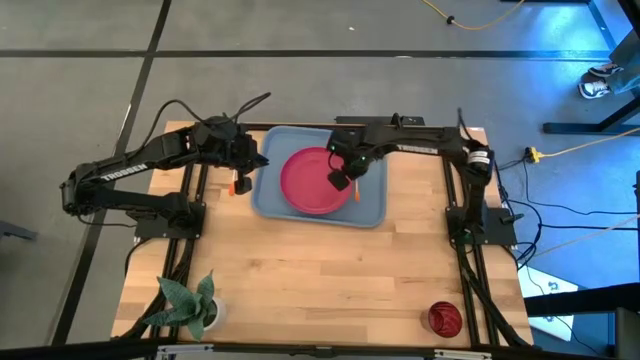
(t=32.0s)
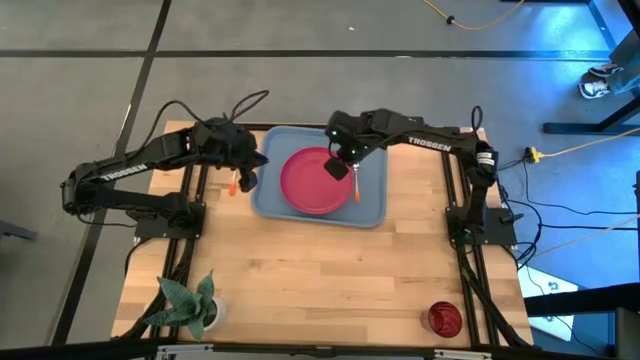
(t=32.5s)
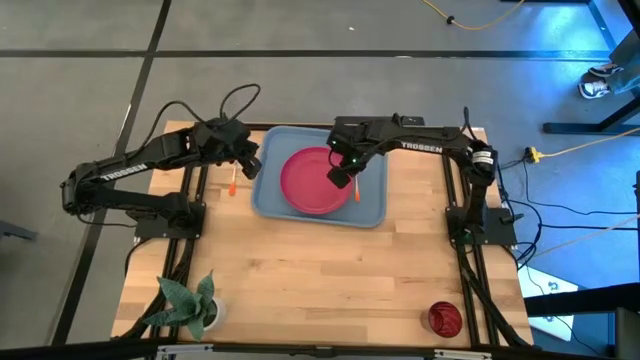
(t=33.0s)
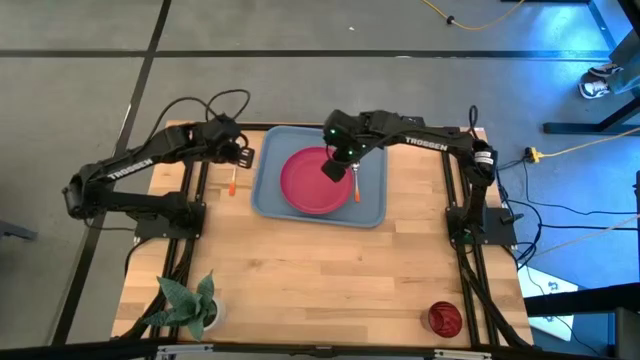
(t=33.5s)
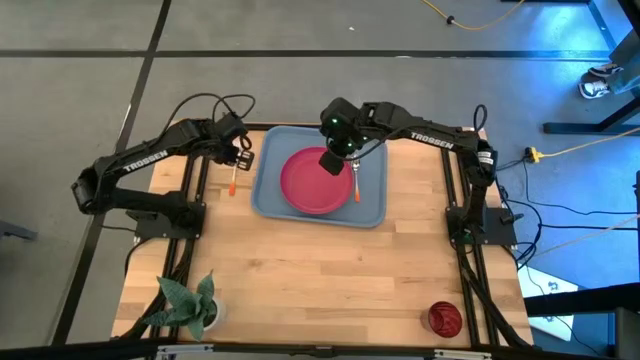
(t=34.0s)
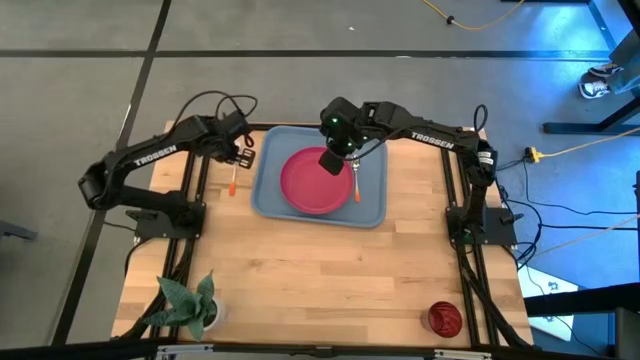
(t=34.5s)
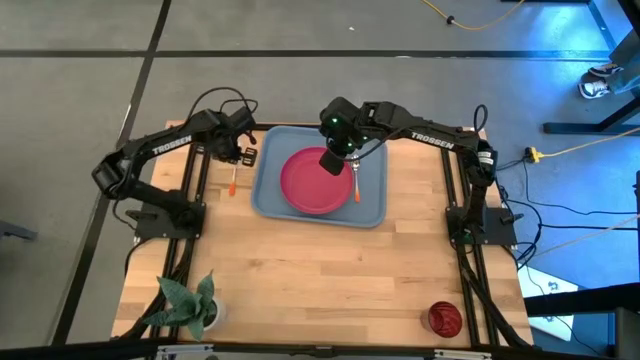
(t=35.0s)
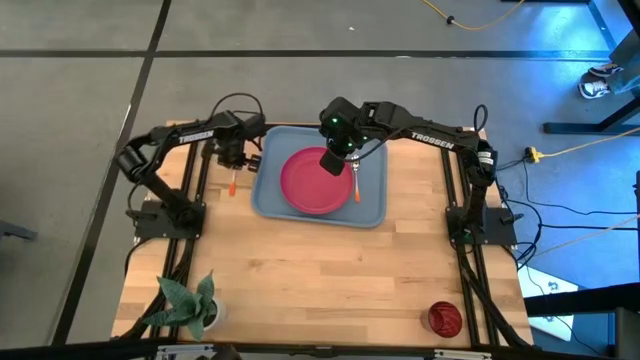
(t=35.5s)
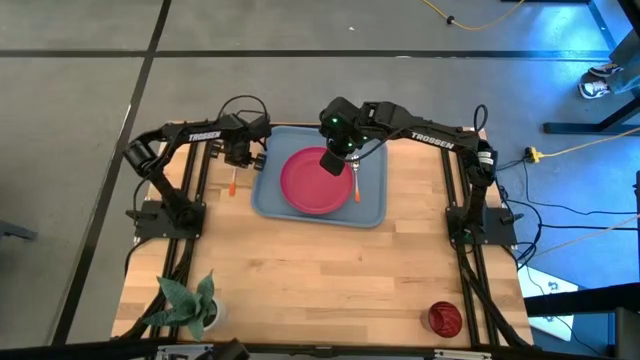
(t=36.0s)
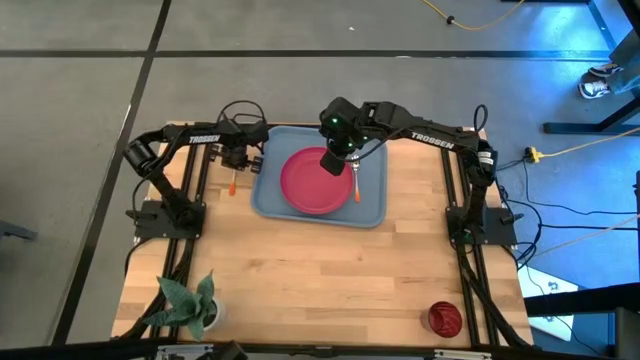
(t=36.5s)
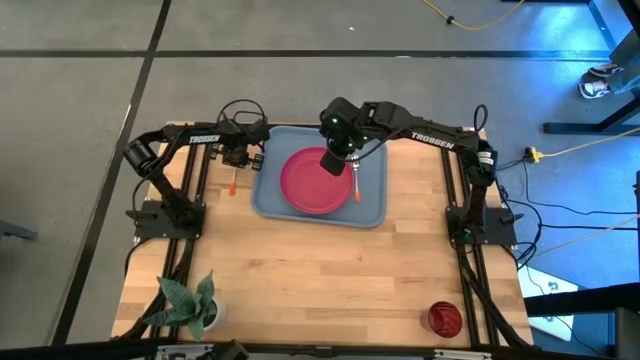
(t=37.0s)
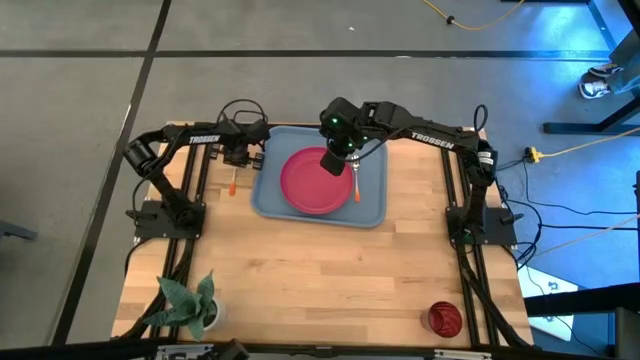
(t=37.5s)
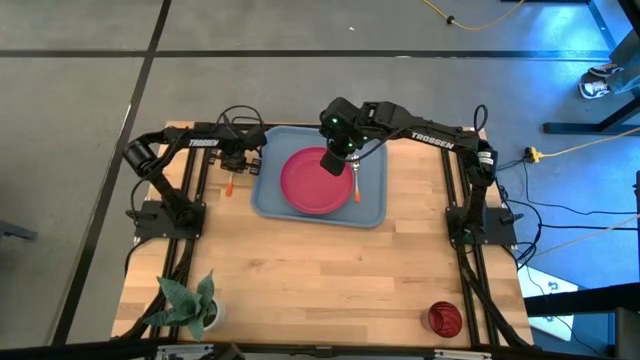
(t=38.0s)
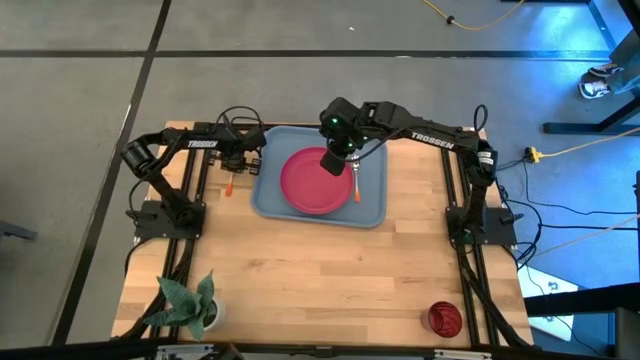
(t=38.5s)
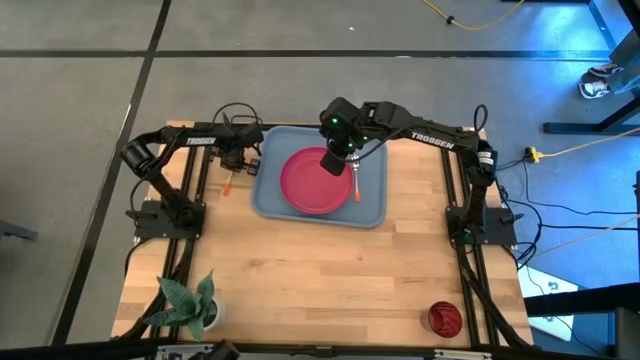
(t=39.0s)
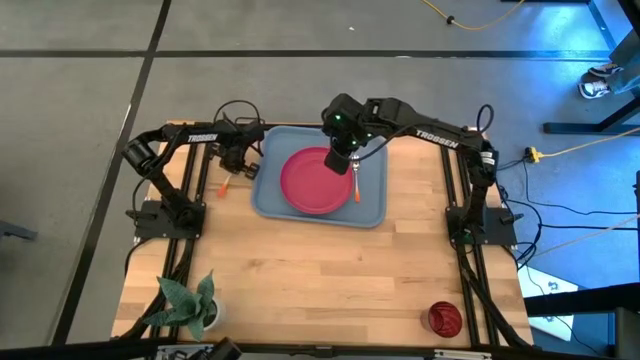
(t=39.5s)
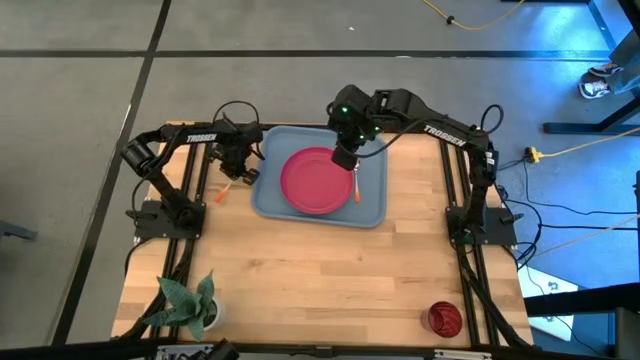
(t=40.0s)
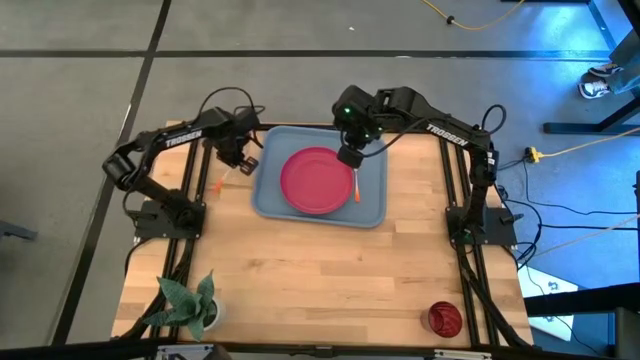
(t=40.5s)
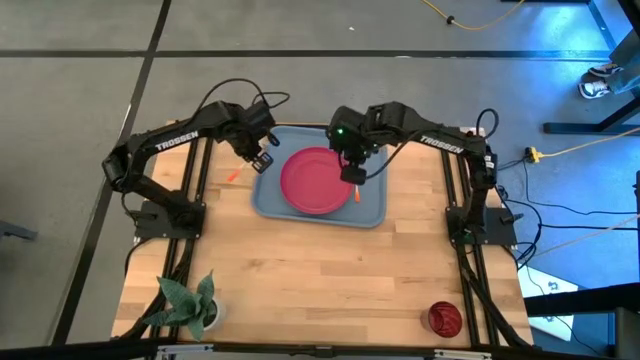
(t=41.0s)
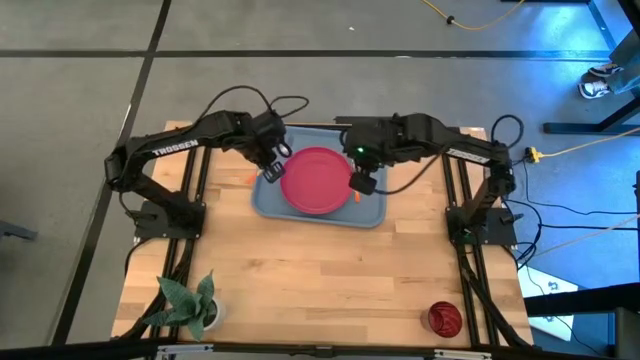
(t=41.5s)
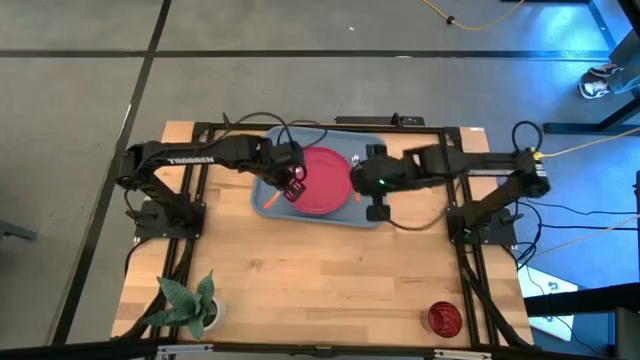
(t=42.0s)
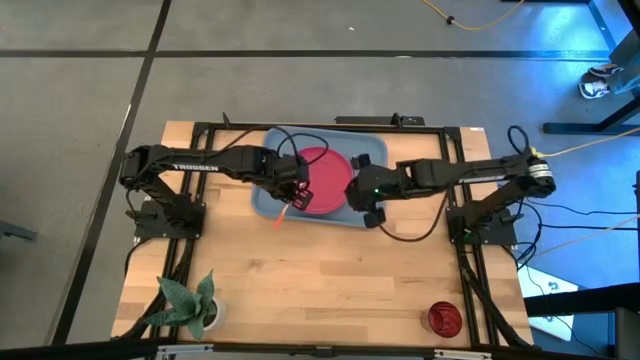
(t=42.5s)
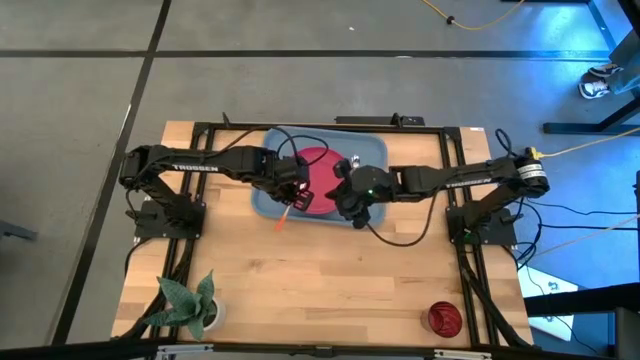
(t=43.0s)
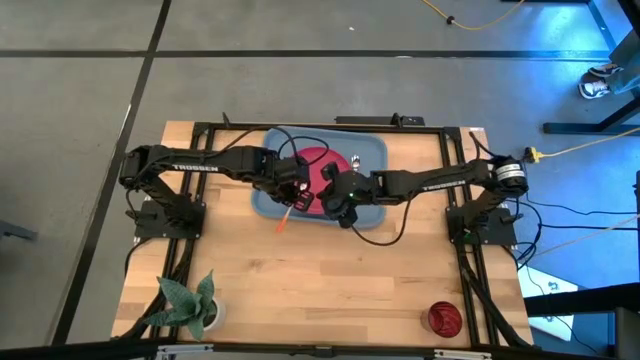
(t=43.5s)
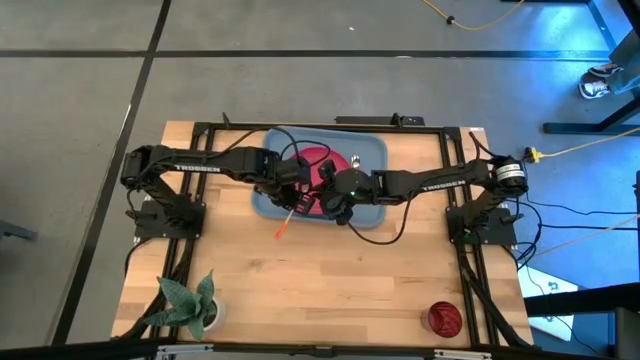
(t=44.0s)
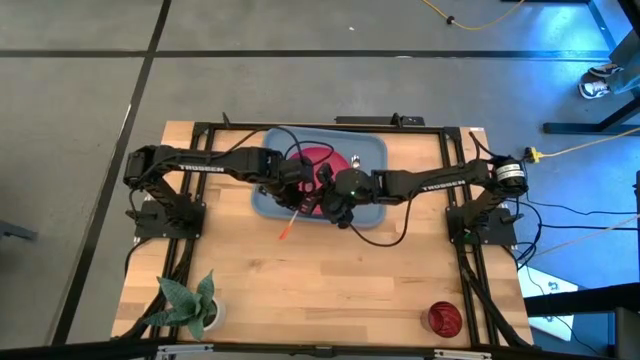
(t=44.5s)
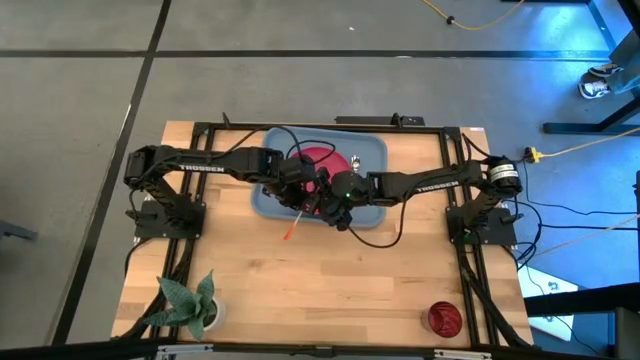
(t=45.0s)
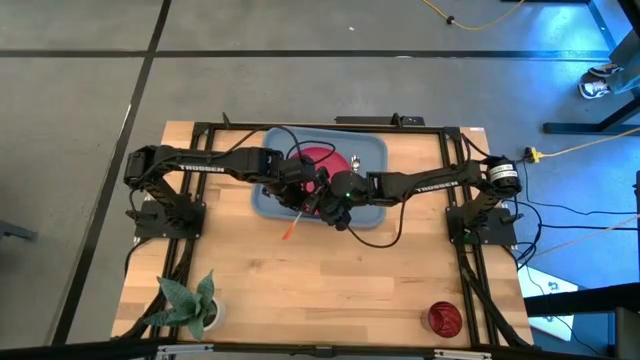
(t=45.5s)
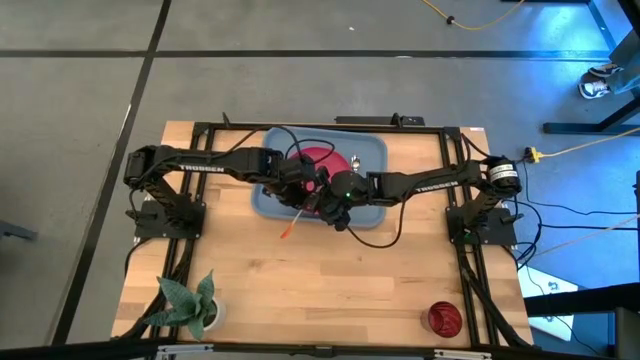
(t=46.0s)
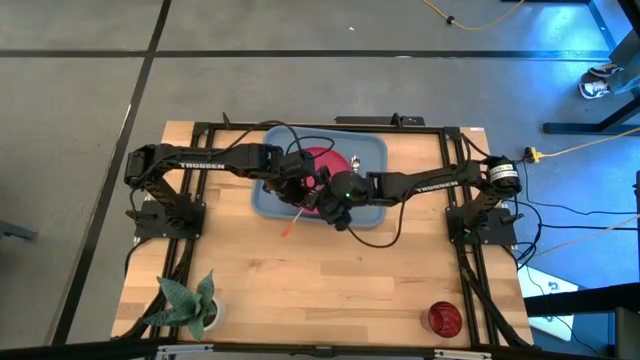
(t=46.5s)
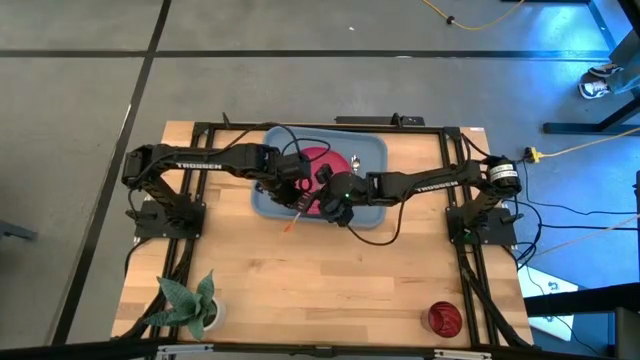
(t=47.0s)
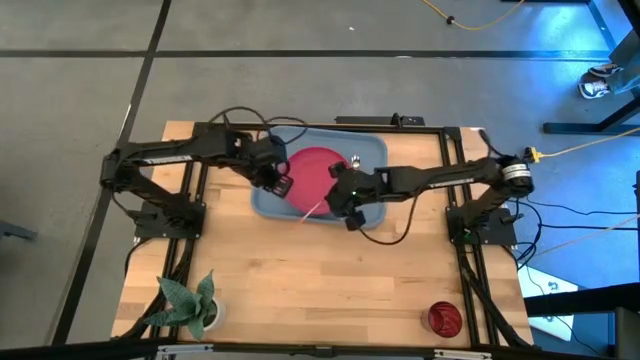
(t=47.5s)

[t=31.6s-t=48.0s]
Task: Pick and place plate/cup/fork/spoon on tray
Put the orange fork on the blue serving tray at the right of the orange spoon

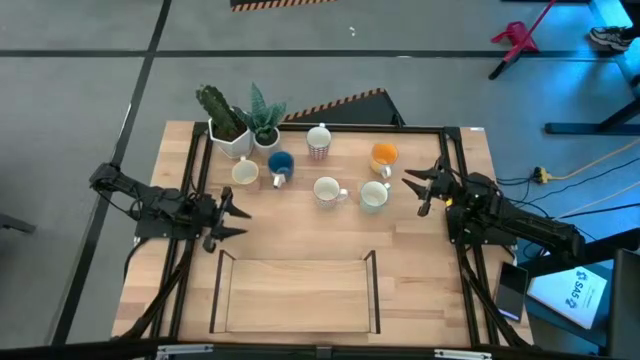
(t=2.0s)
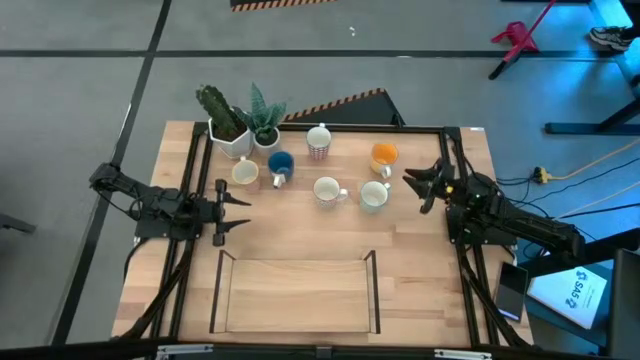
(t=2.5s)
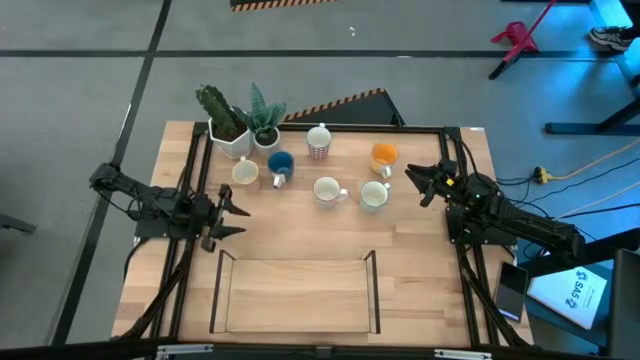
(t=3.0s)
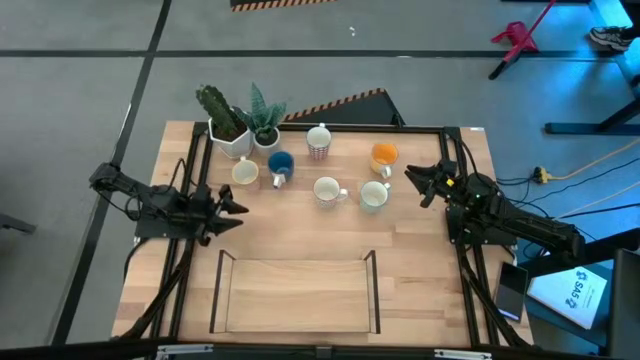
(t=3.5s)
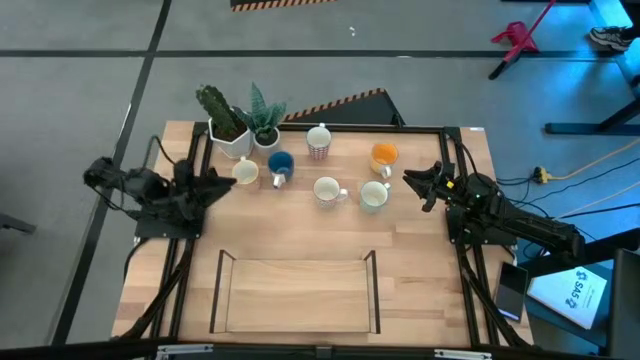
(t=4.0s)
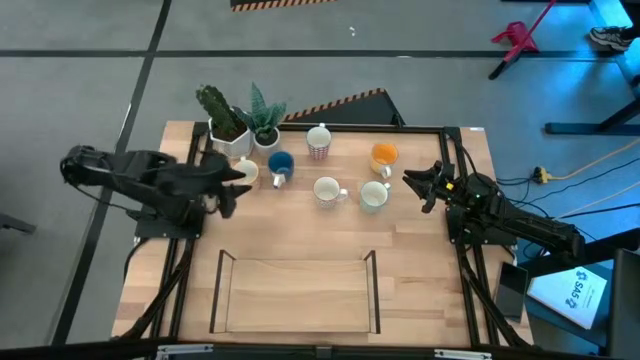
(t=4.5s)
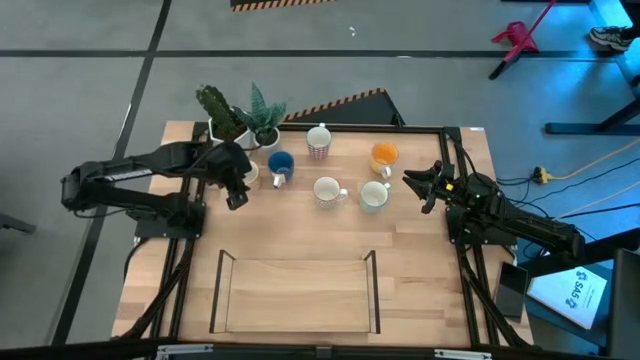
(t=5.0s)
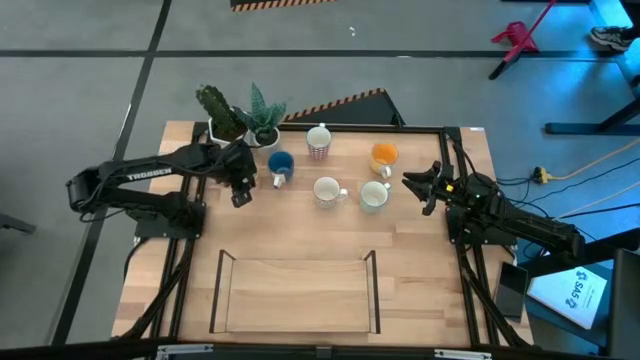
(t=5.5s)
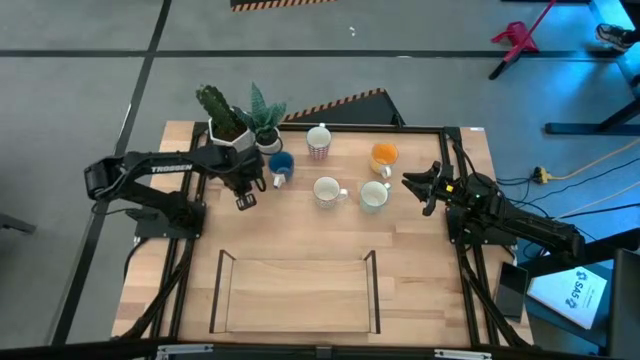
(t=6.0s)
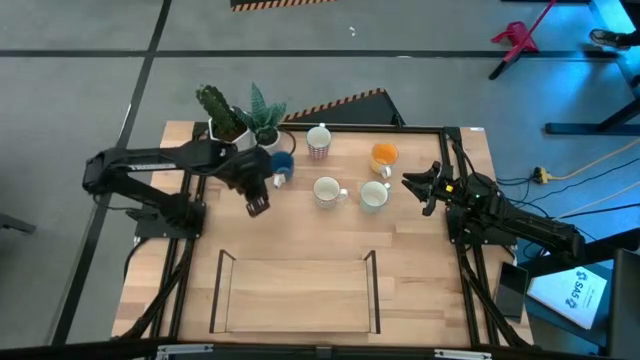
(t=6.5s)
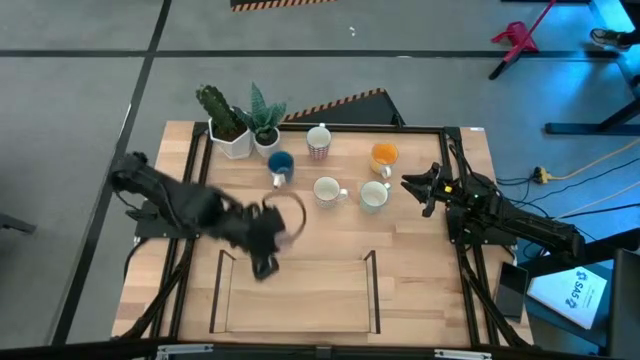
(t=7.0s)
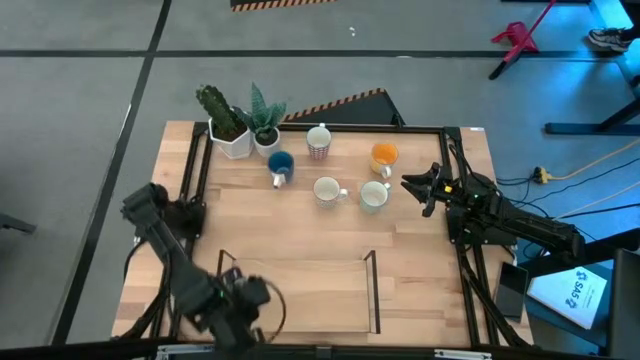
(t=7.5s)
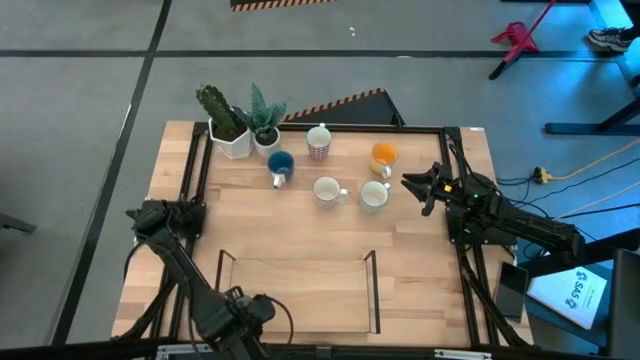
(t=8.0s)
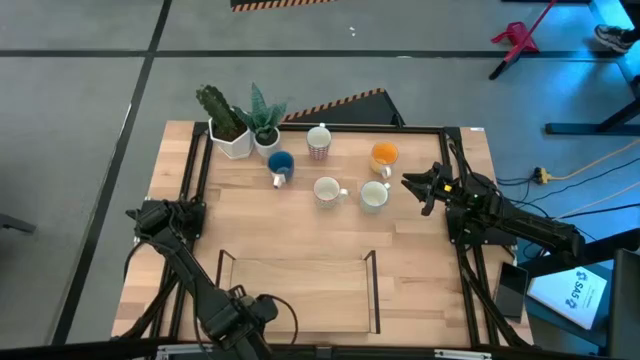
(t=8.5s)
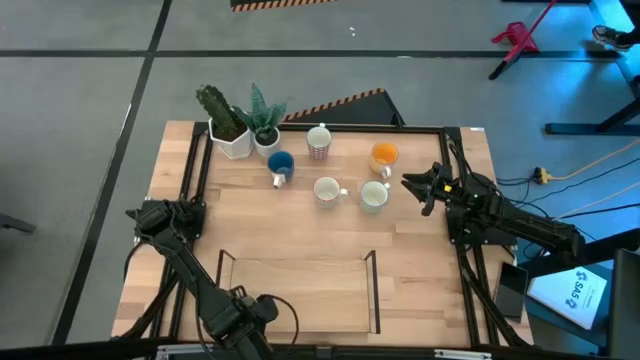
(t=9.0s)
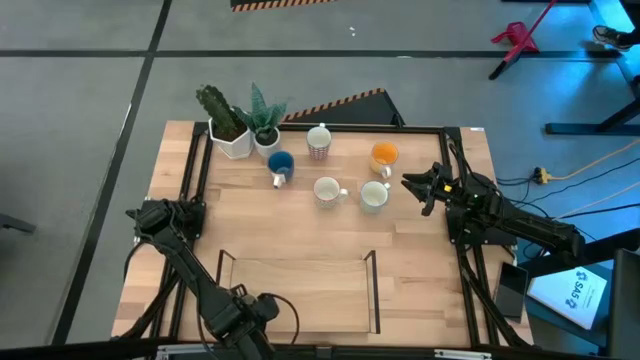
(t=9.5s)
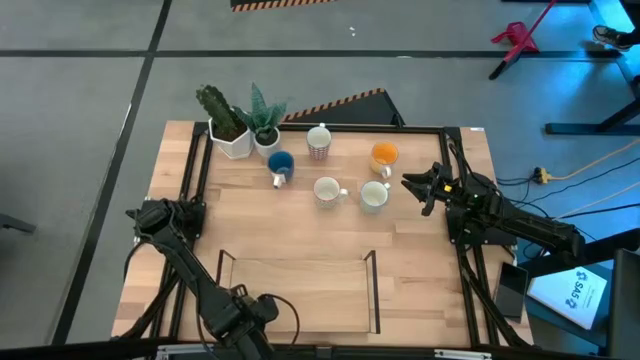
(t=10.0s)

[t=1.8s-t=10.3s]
Task: Place coffee mugs
Put the yellow patterned mug on the shelf
